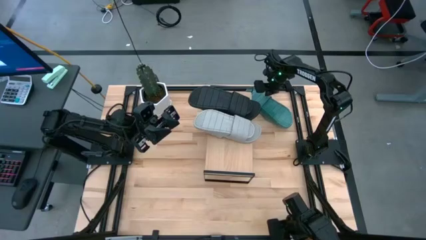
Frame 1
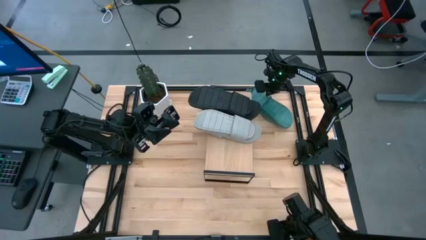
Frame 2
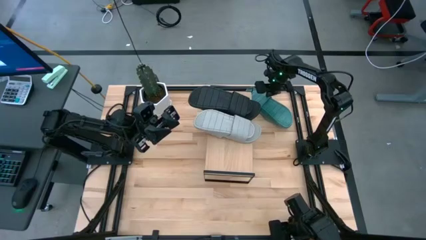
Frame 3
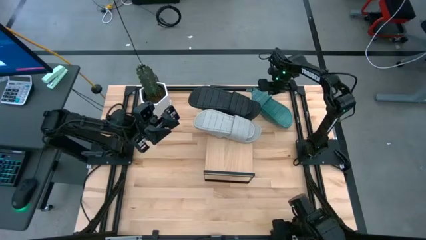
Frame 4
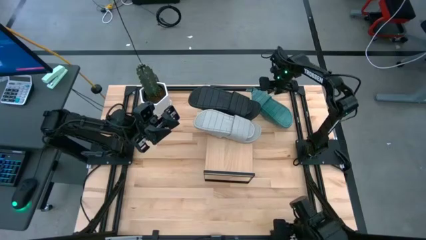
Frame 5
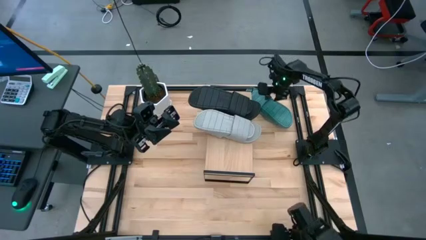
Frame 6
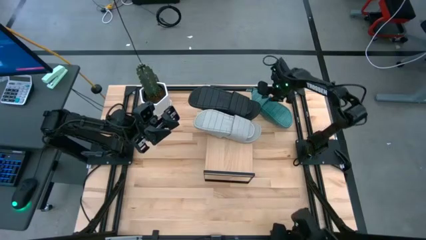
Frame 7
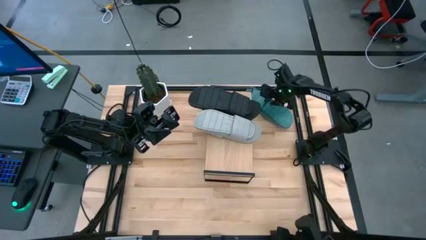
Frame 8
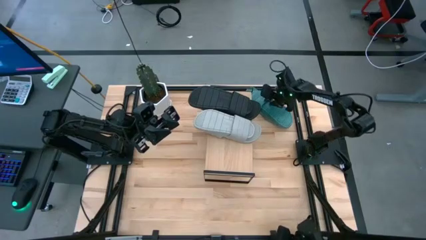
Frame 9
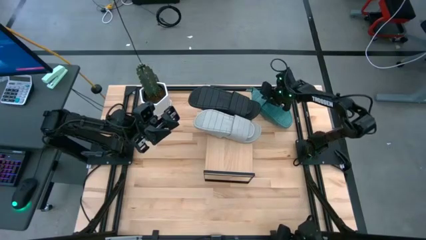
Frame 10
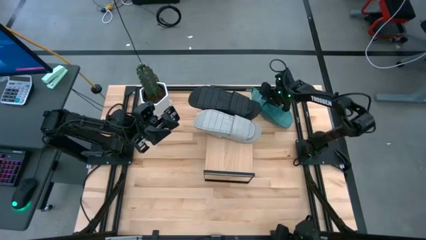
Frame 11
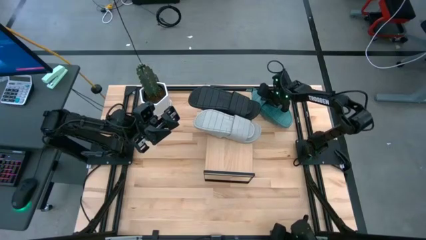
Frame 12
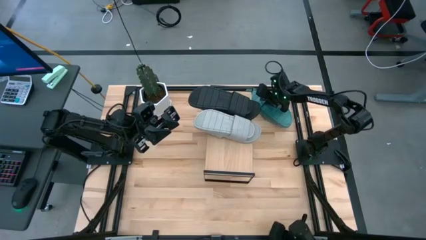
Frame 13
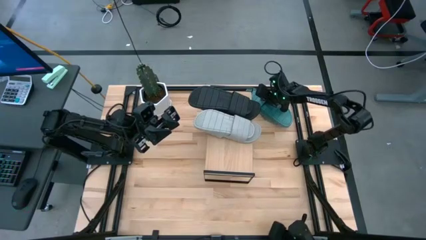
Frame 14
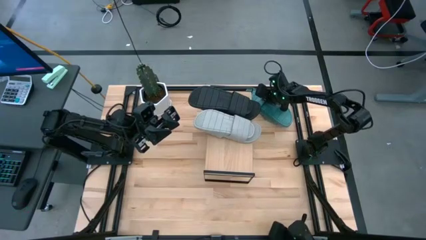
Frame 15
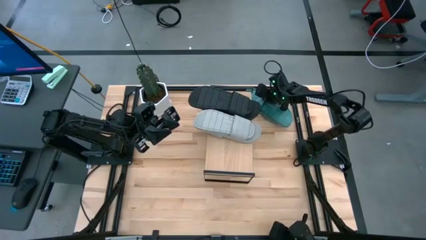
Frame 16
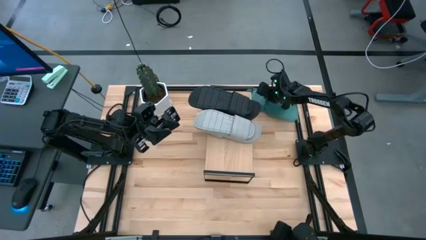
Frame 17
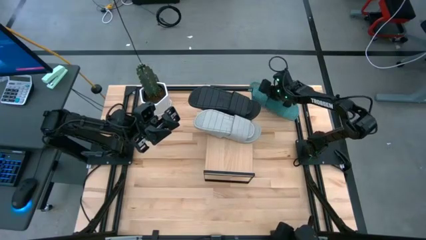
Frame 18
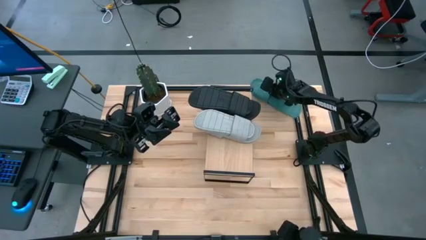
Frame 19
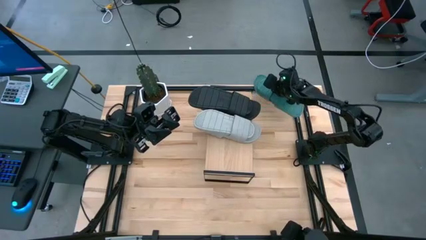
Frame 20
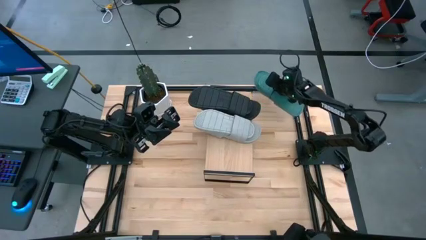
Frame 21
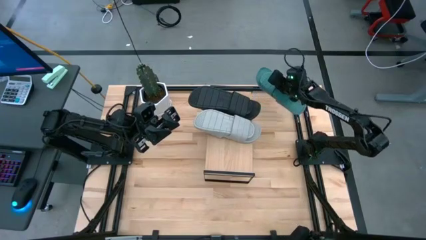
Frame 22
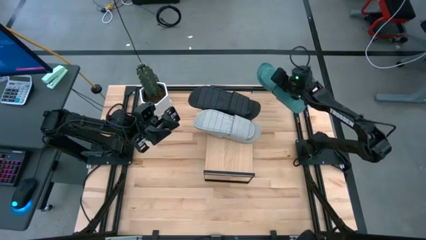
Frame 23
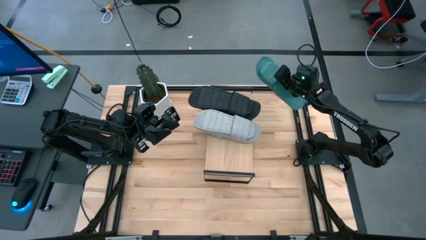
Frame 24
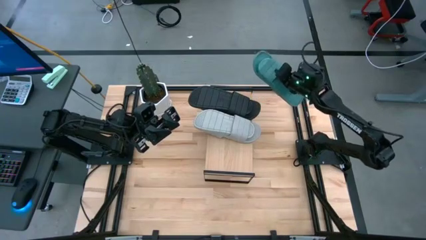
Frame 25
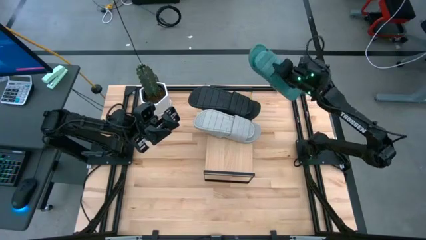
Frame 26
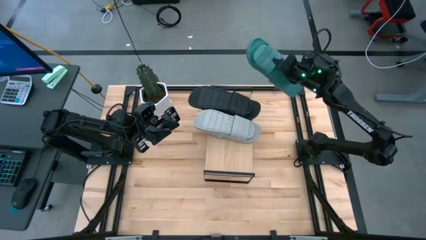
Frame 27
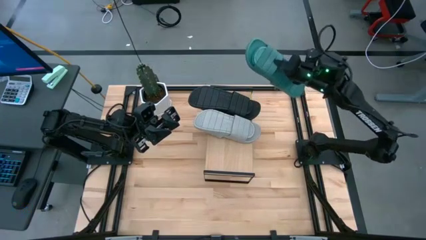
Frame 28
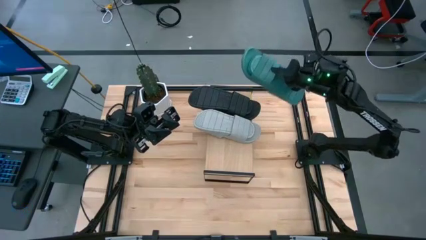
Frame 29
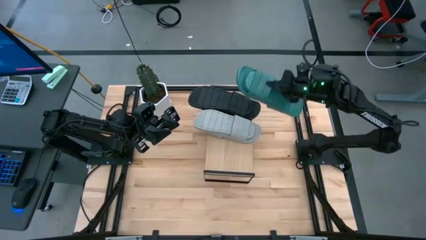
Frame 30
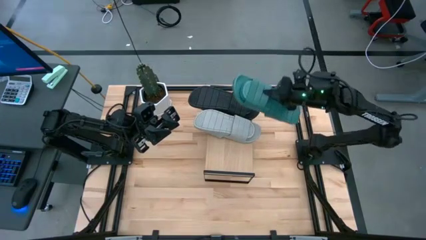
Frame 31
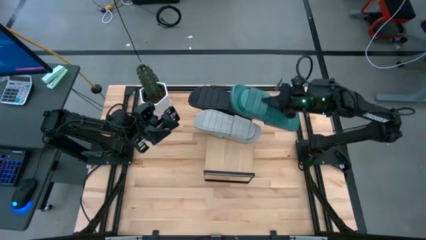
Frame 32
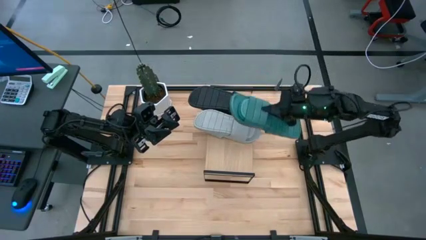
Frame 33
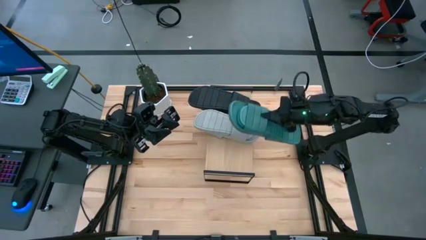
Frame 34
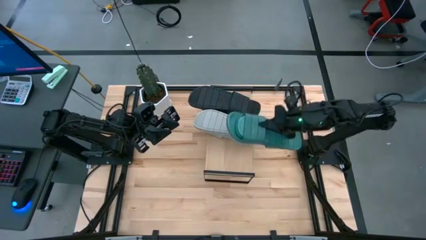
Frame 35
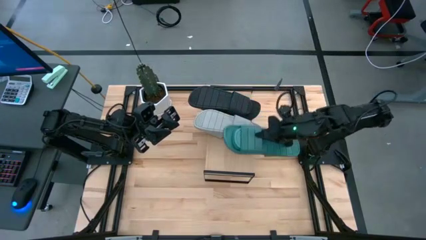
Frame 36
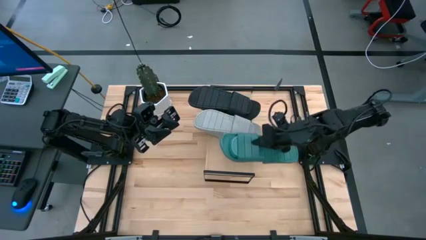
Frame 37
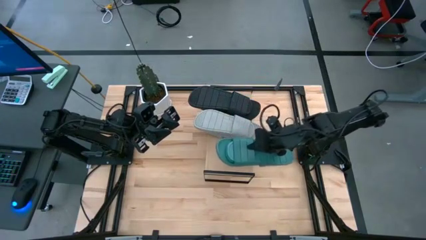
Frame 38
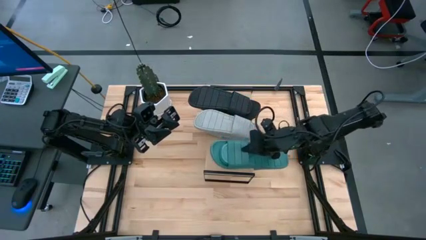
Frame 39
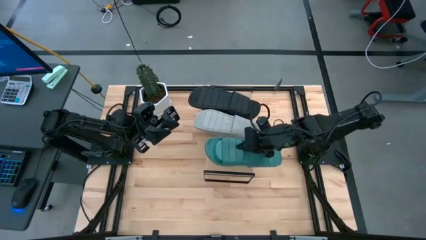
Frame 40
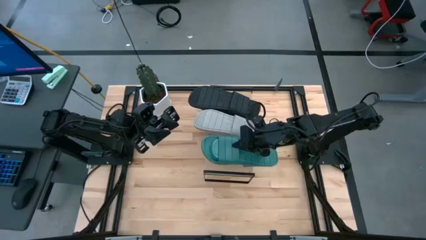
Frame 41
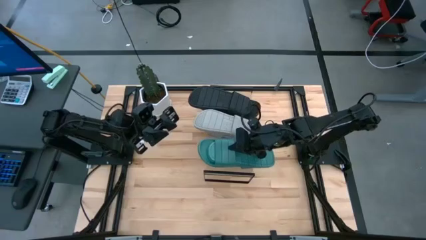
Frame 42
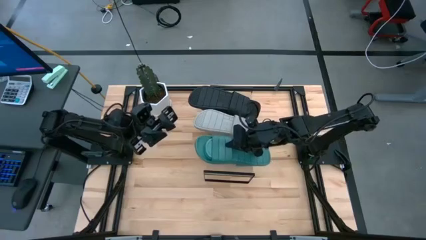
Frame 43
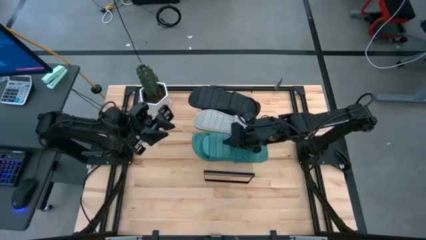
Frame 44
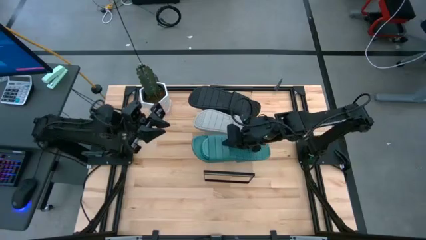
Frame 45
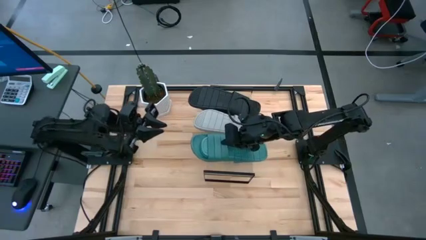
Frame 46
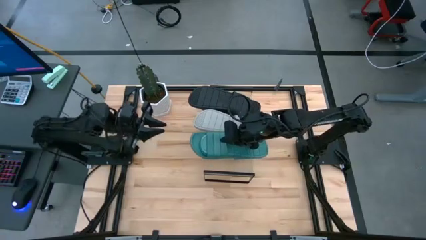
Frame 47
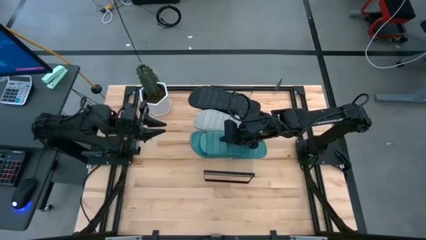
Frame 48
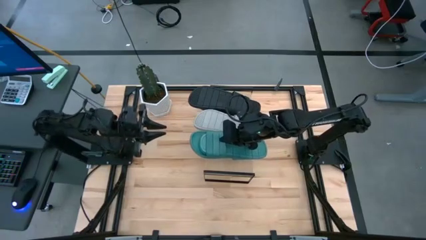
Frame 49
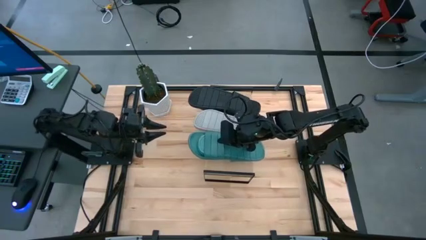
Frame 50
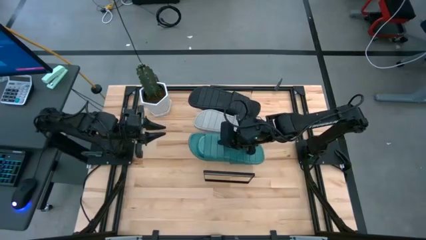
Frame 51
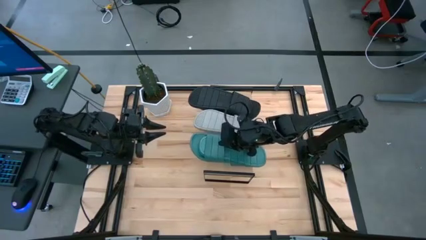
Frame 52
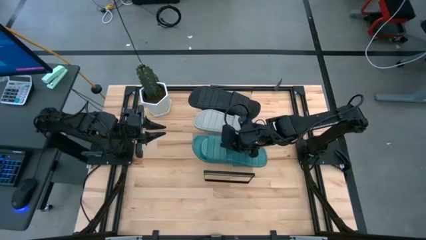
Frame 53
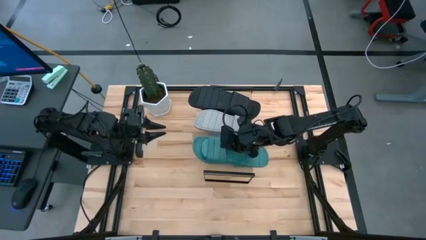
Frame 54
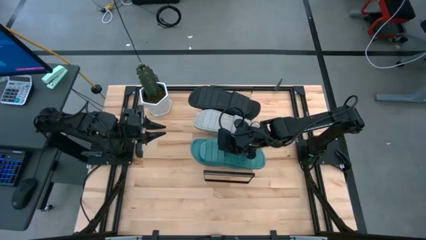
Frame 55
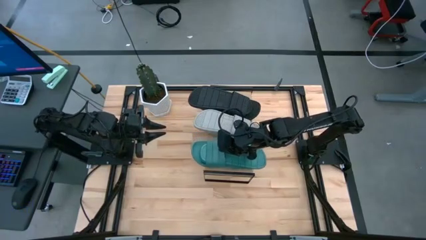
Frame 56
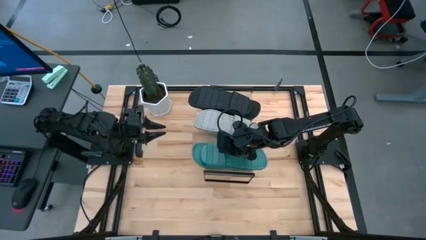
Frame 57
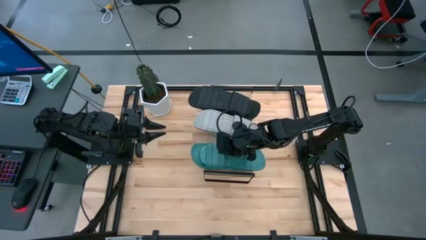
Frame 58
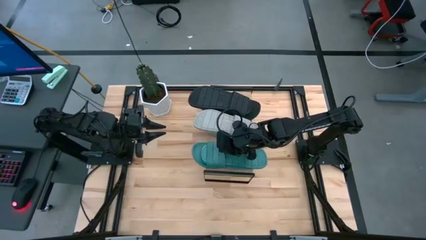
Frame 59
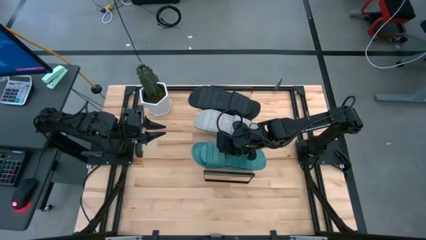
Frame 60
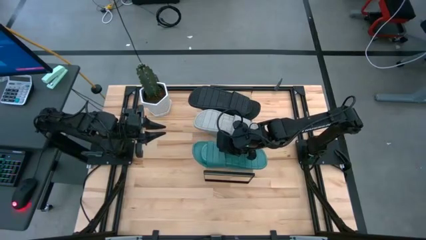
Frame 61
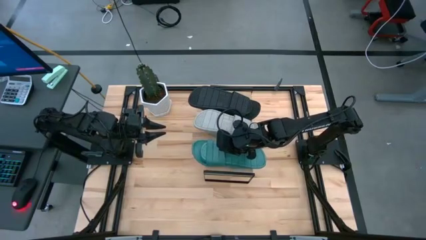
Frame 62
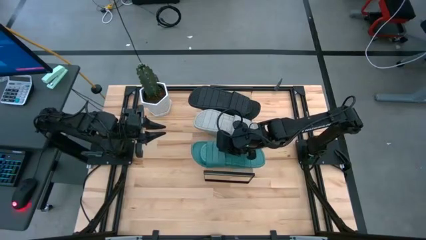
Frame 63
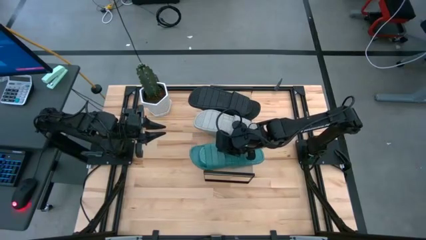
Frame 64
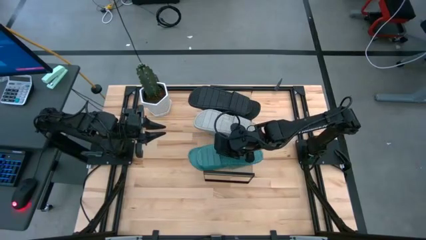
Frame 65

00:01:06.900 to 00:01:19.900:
Task: Pick and place slides into the shelf
Put the green slides on the shelf

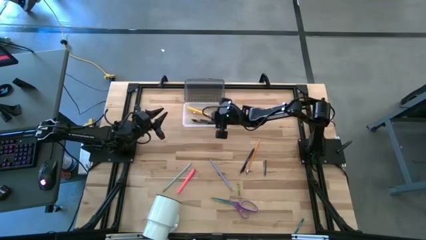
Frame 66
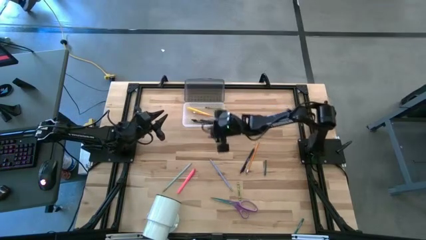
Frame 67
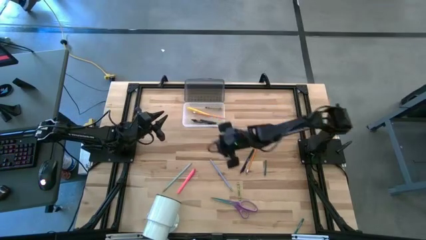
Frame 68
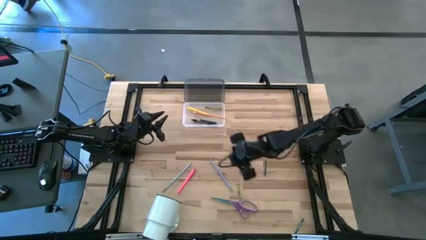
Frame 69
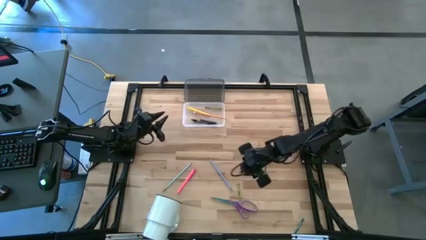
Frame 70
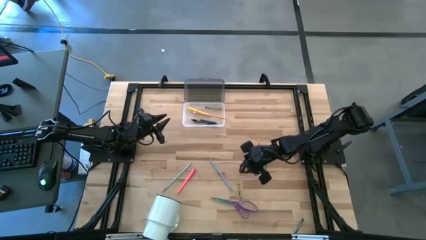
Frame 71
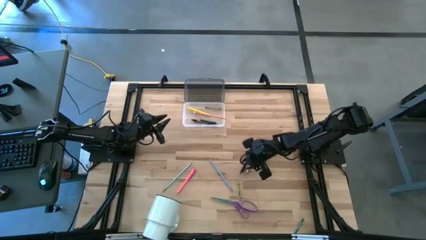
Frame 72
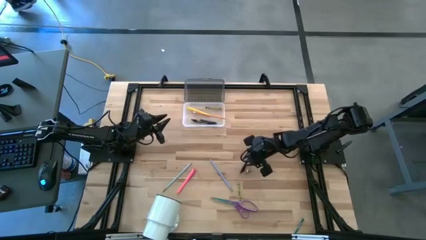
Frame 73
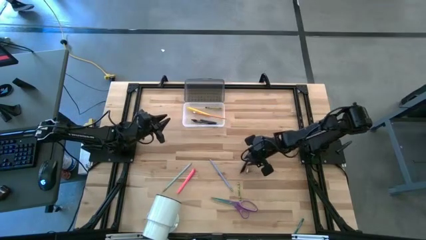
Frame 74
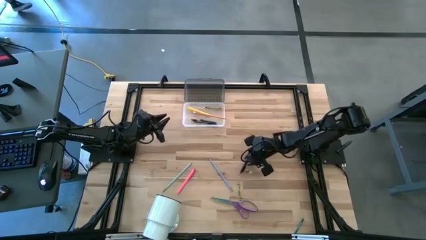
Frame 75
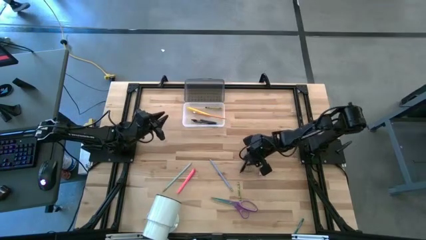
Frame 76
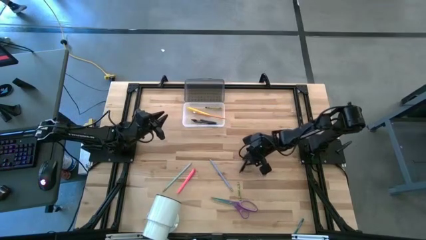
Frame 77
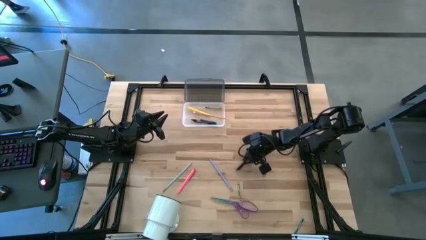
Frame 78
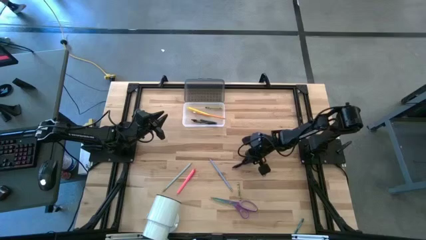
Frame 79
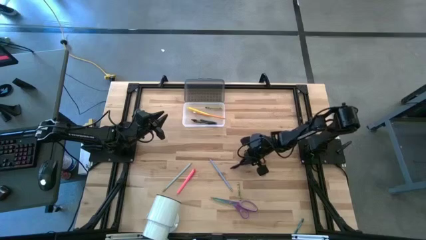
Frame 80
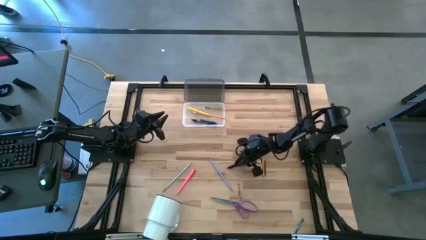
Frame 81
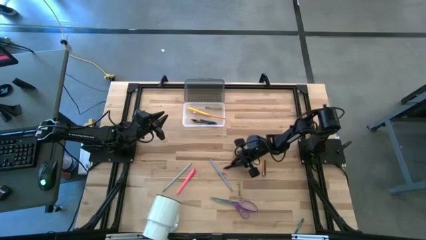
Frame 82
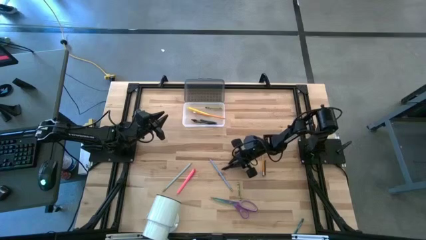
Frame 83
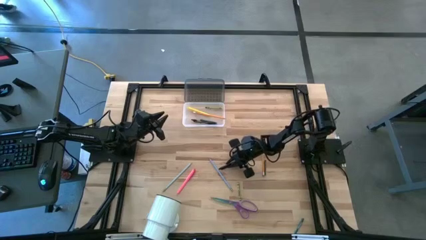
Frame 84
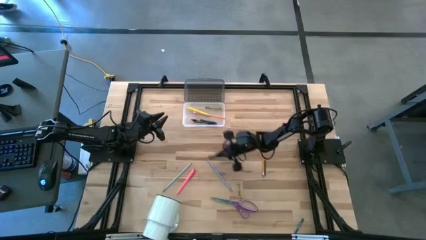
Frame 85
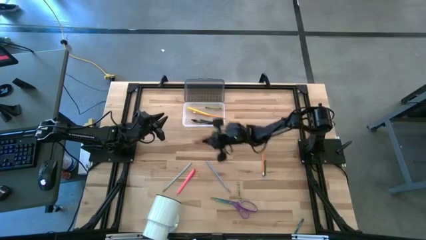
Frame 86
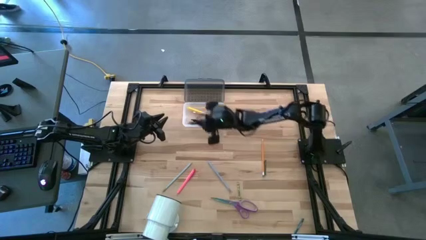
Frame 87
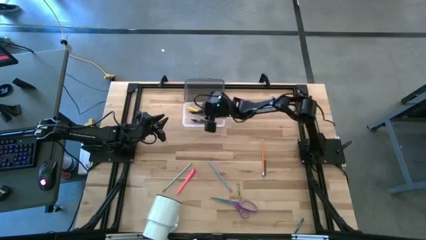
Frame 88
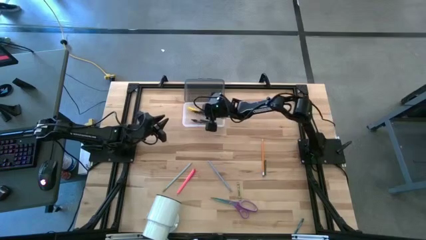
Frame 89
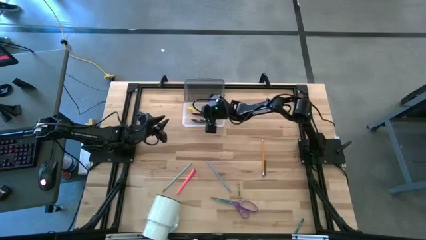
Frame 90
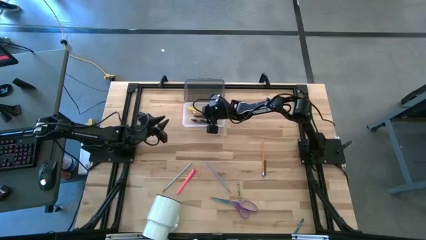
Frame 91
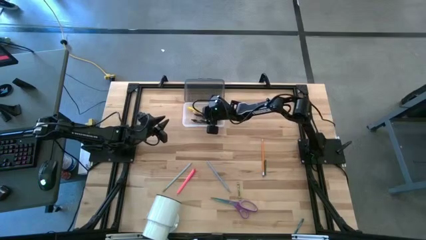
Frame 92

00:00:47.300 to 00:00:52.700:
Task: Pick & place school supplies into a supply box
Put the black pen into the supply box
